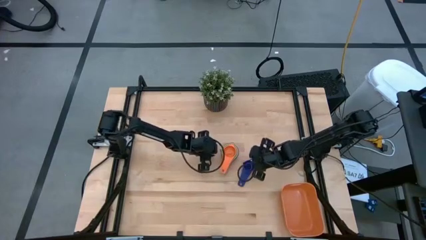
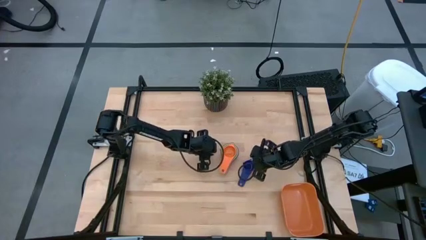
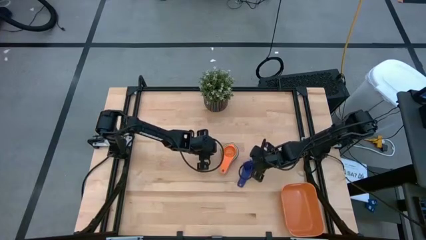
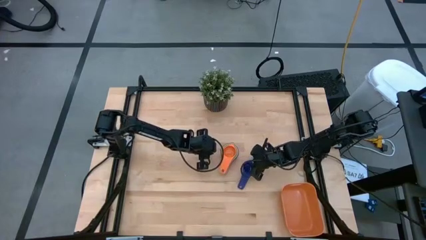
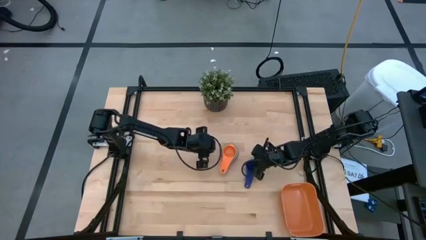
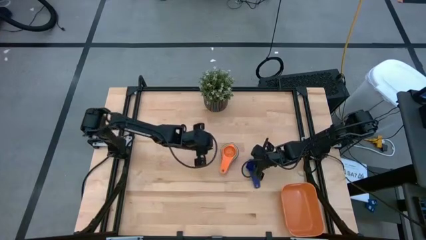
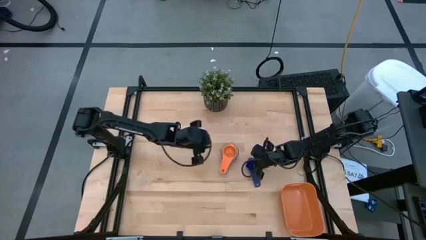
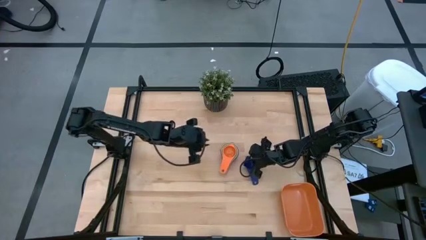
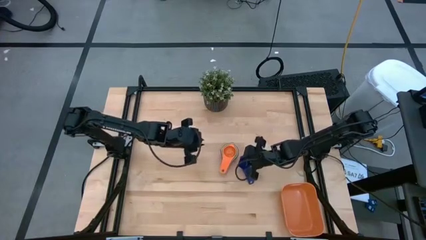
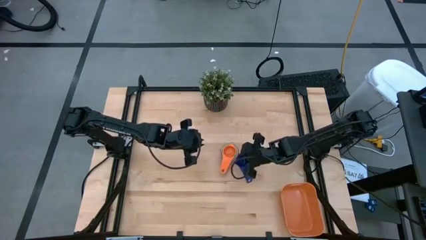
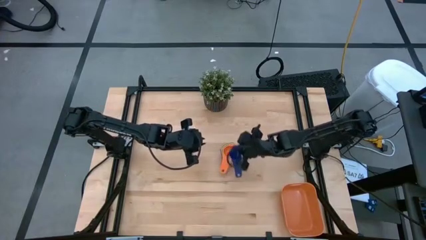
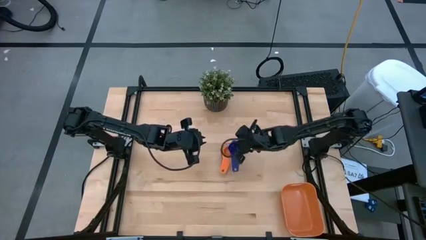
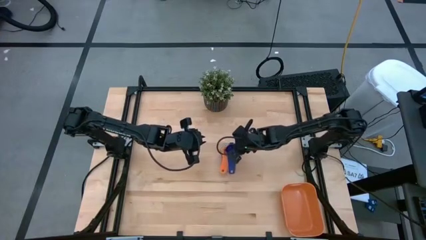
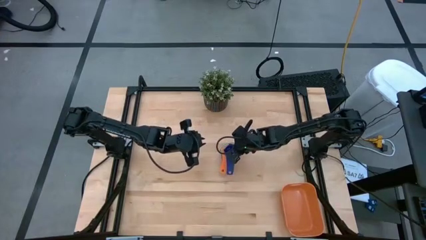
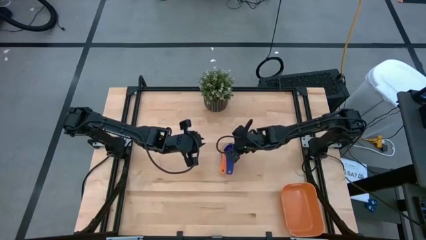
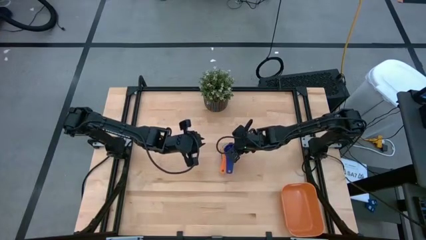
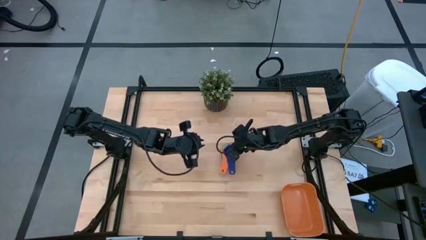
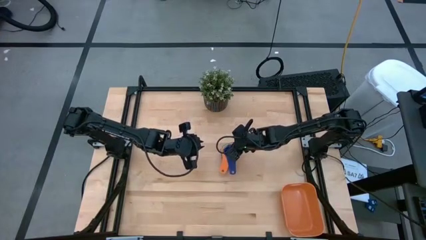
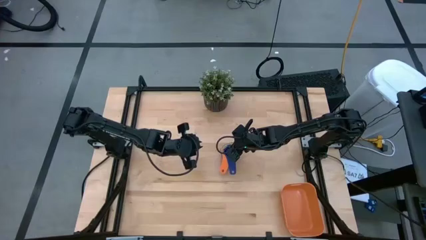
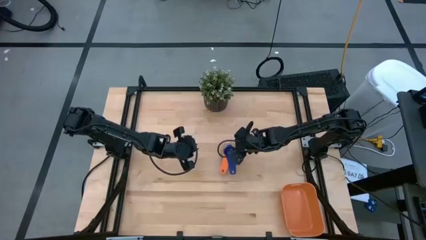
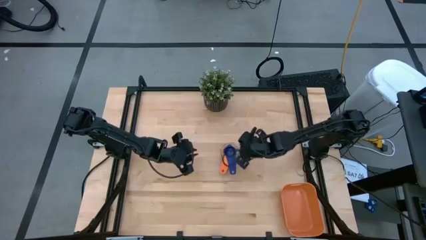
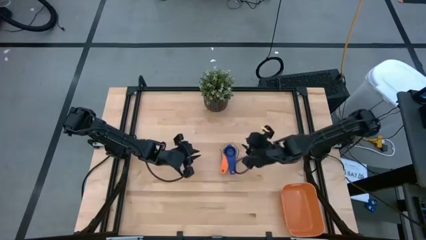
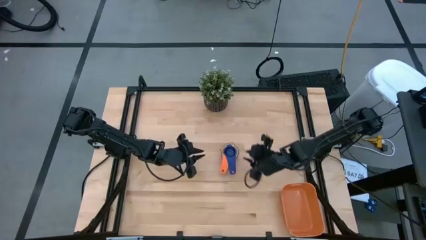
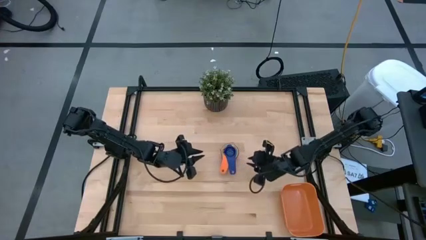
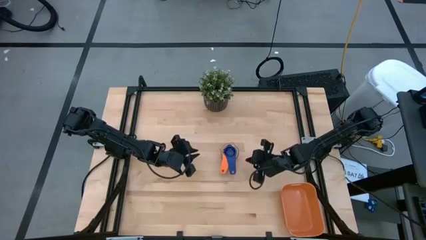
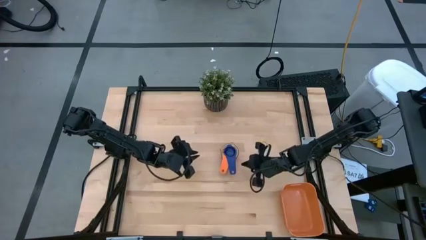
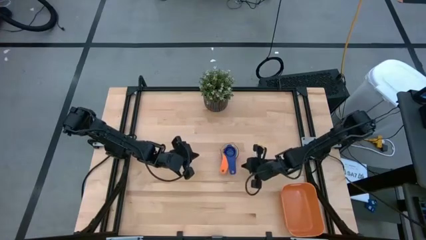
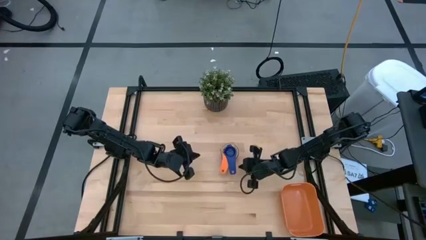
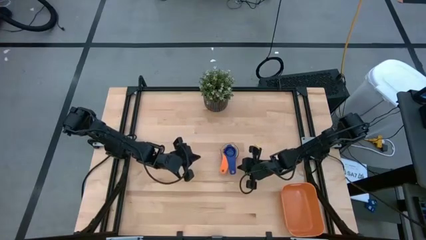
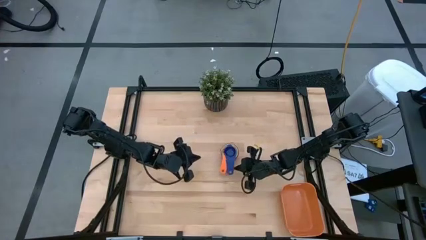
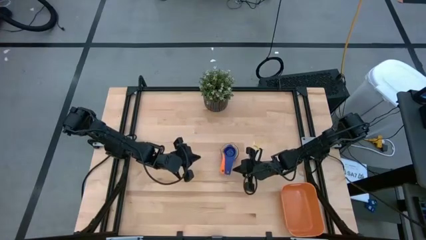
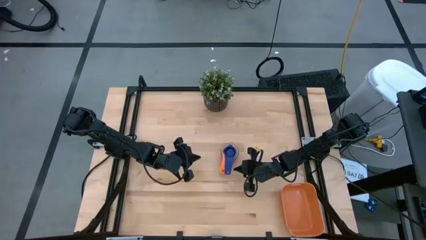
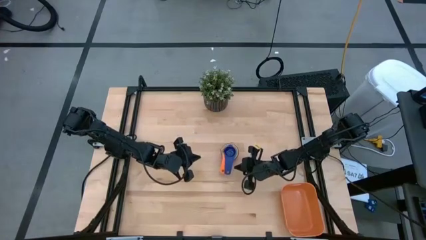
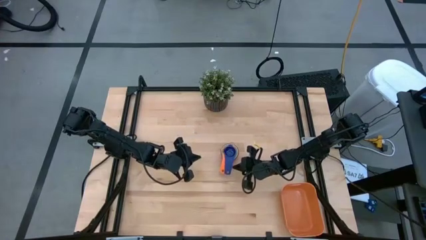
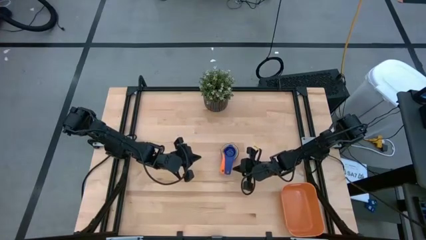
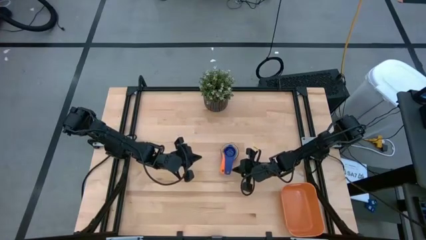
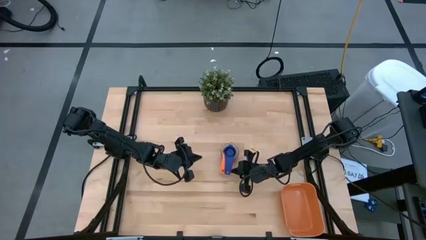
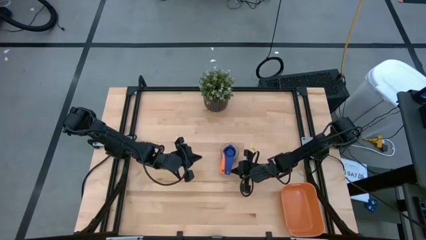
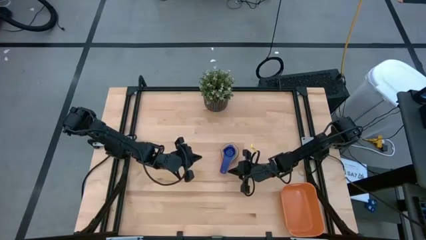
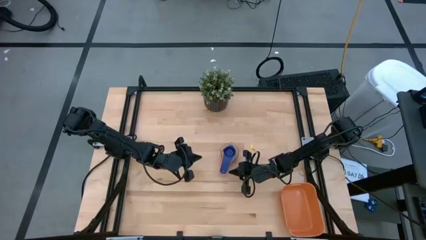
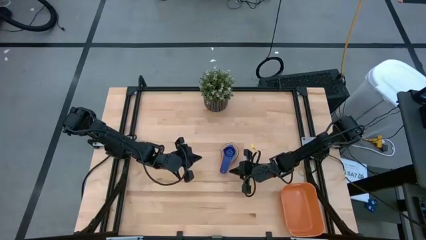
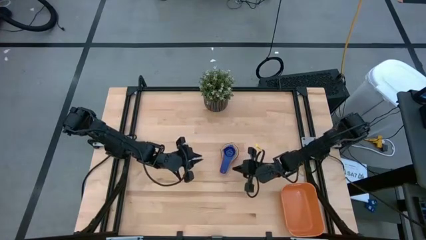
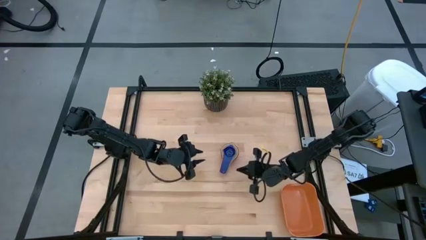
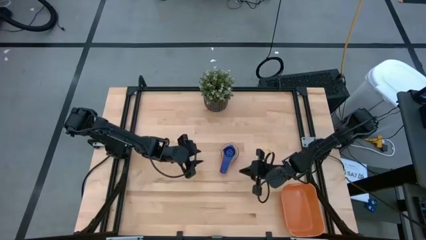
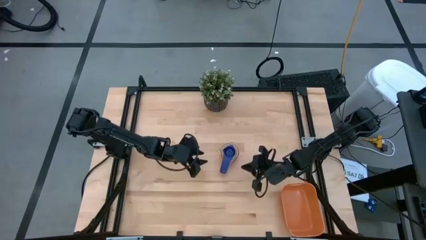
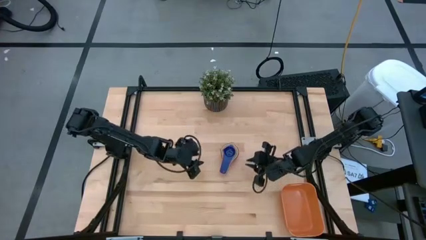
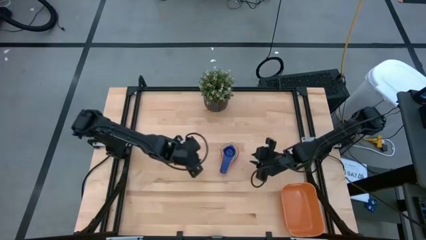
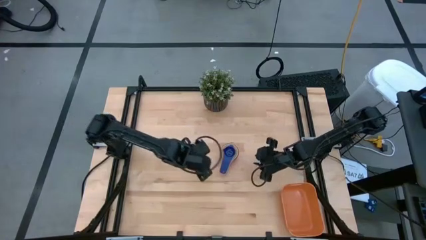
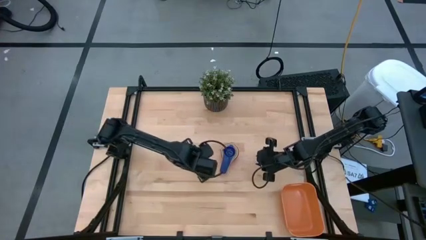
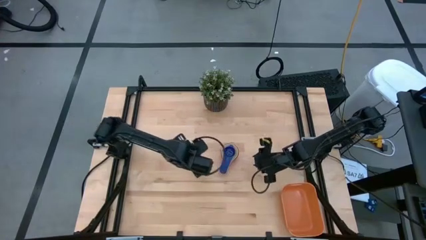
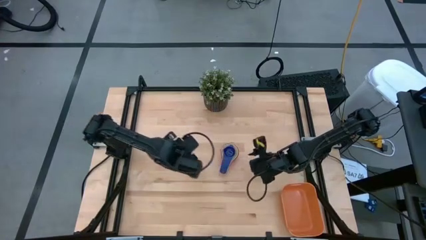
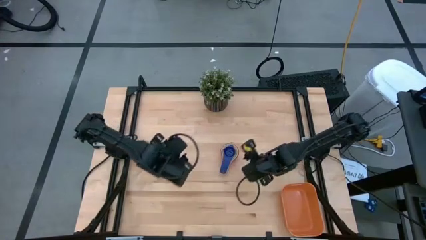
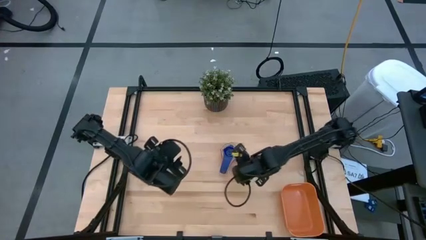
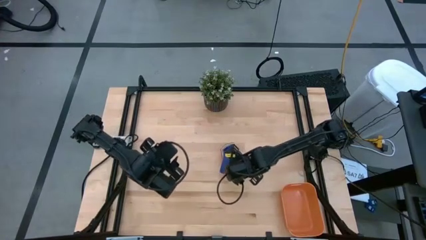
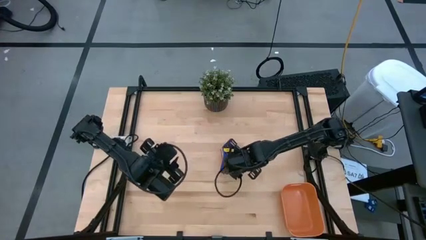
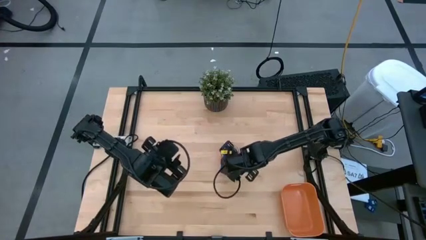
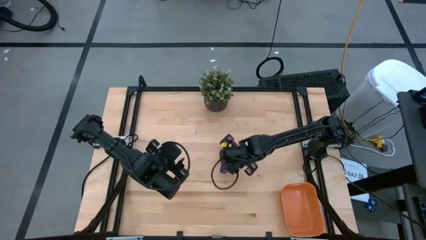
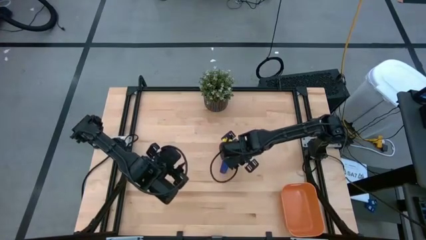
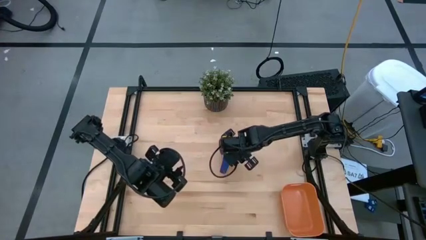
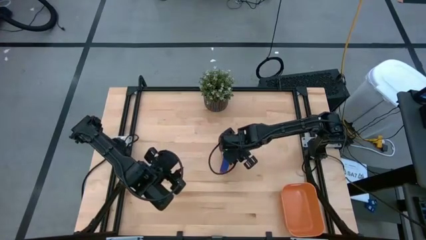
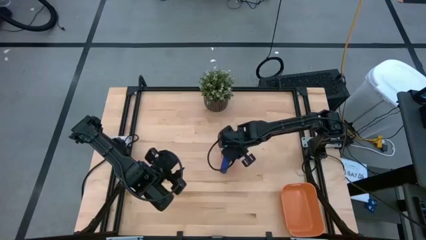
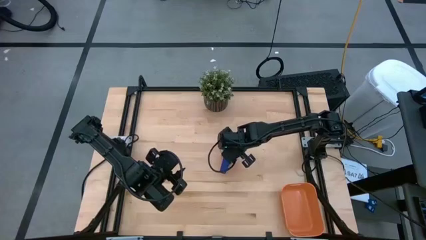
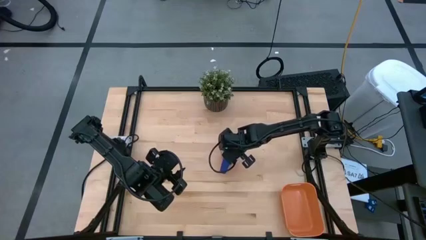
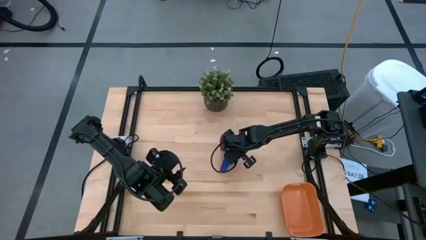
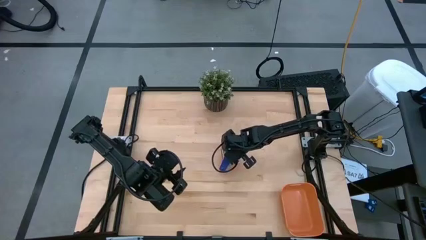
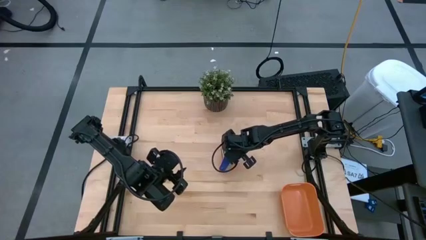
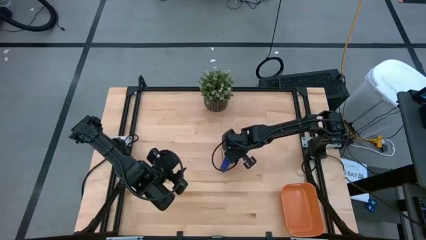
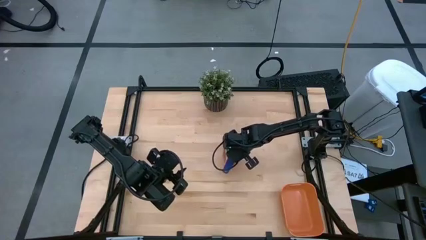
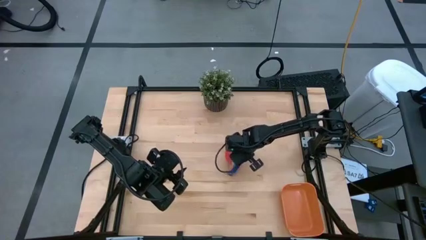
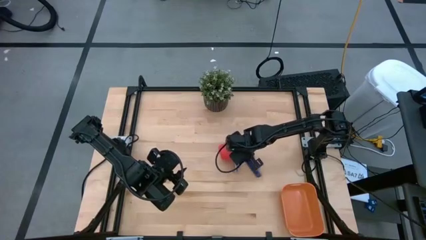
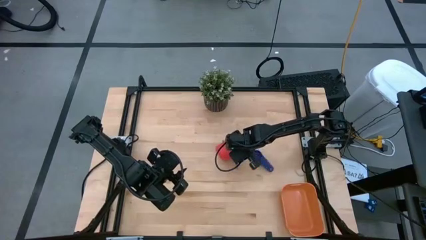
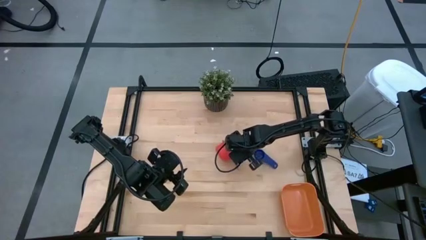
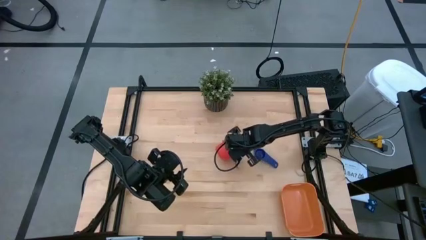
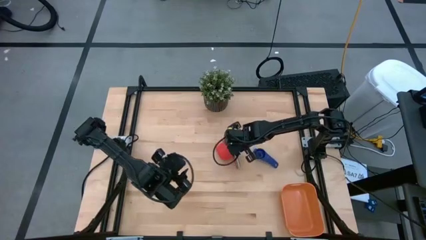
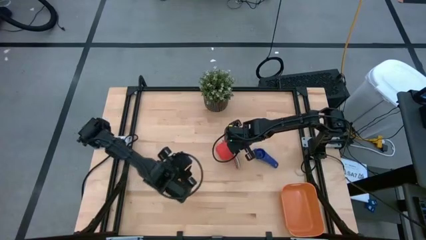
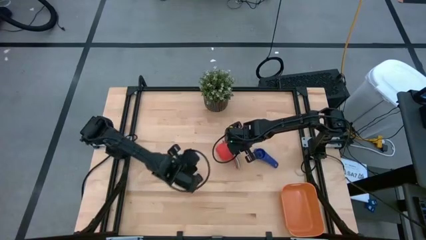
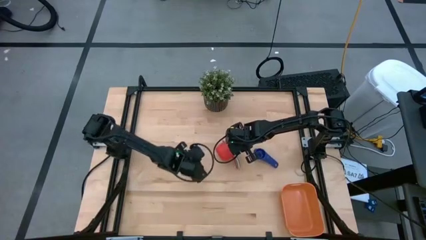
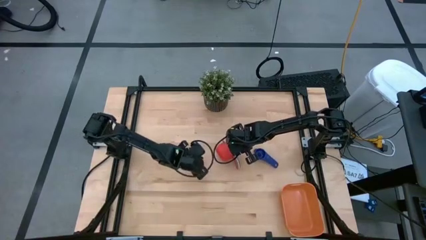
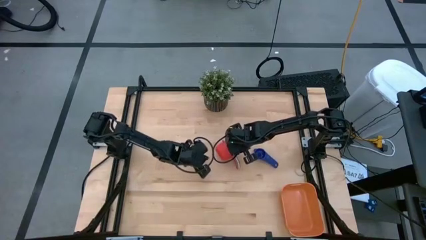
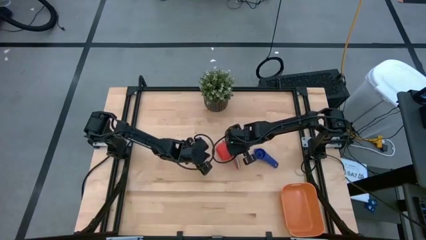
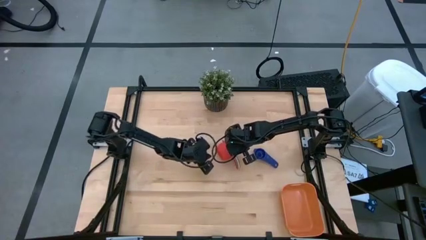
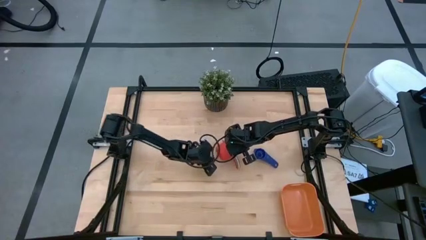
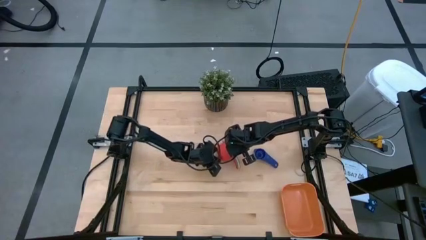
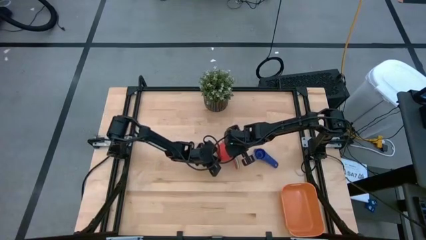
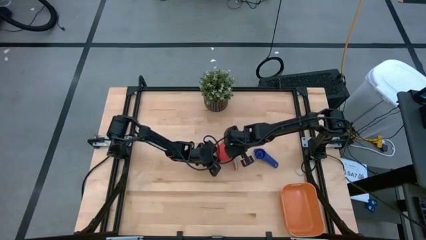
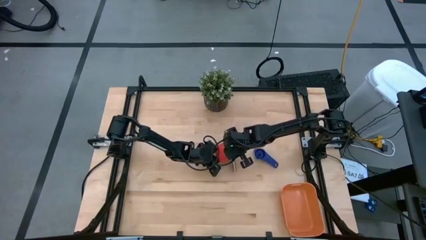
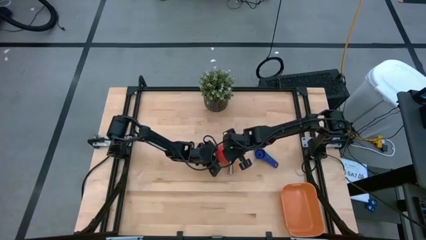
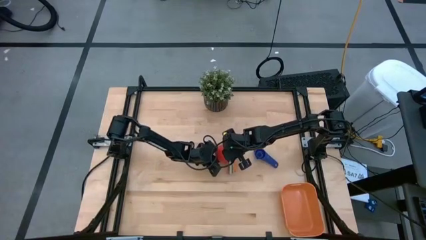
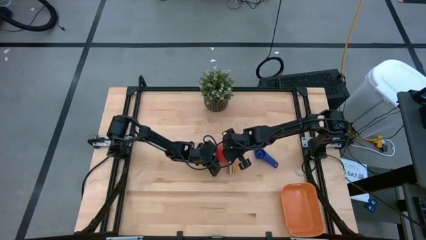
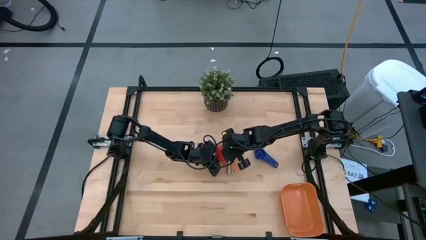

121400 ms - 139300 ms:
Task: Nest measuring cups in basket
Put the nested measuring cups into the orange bin
